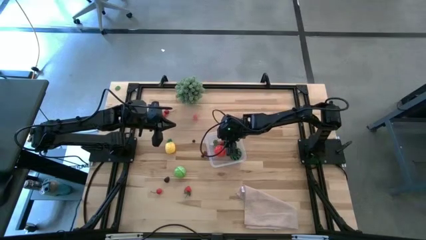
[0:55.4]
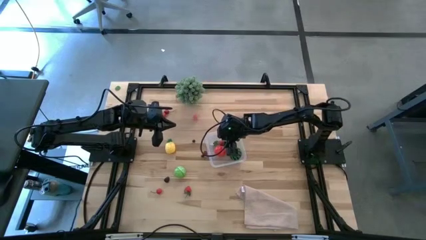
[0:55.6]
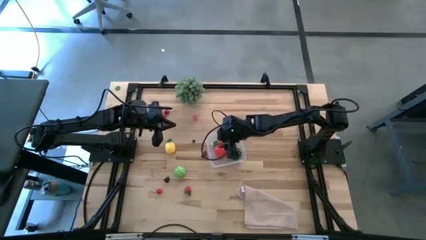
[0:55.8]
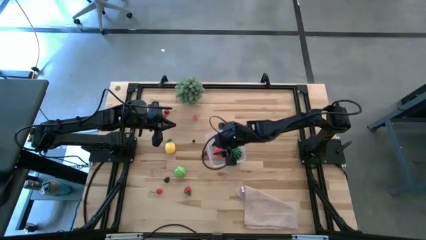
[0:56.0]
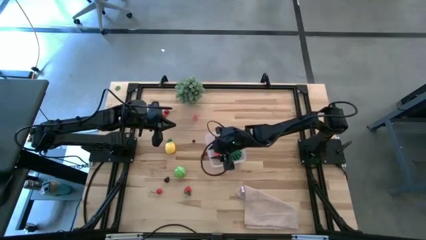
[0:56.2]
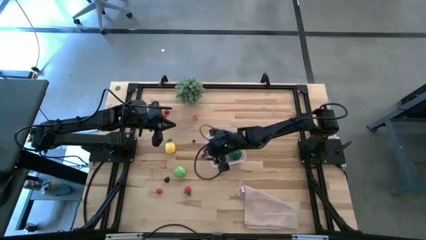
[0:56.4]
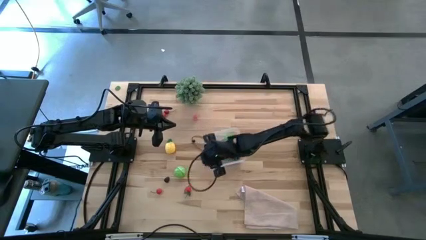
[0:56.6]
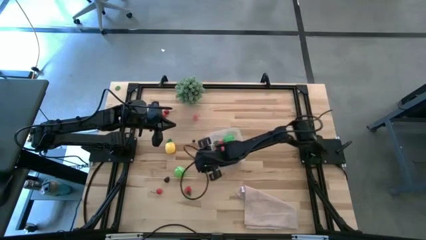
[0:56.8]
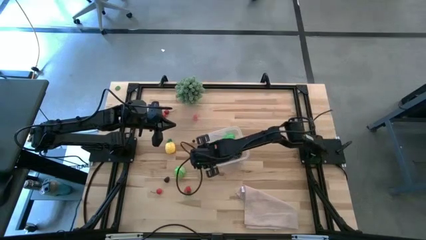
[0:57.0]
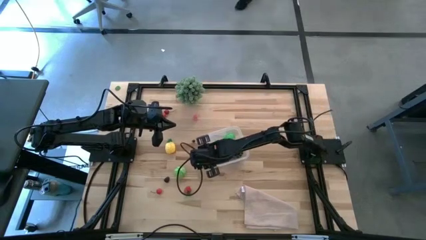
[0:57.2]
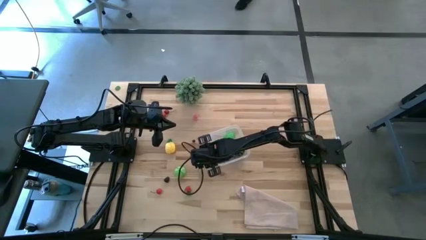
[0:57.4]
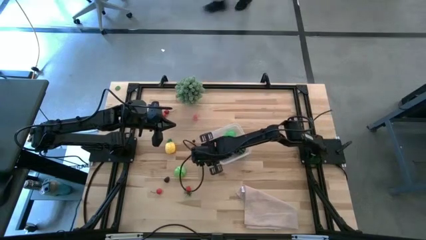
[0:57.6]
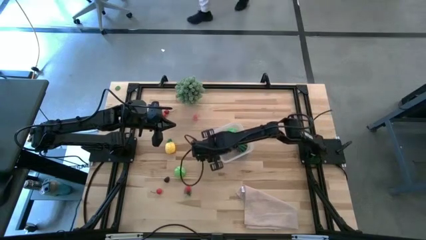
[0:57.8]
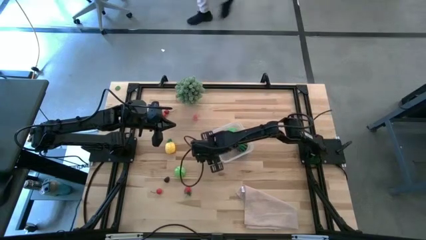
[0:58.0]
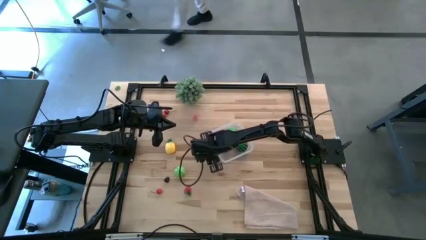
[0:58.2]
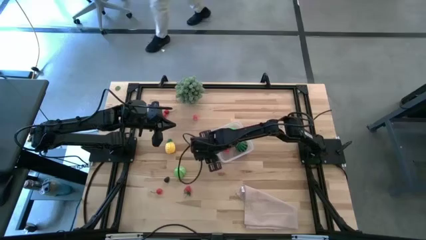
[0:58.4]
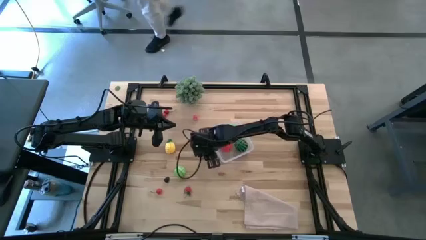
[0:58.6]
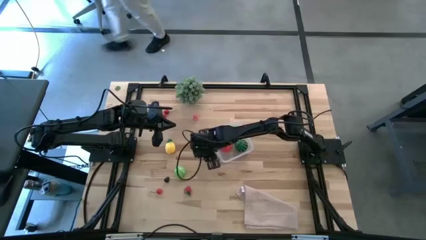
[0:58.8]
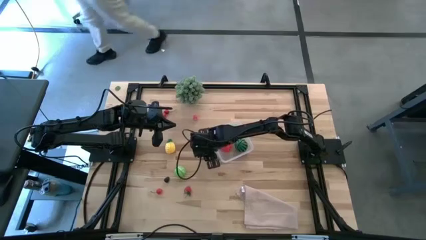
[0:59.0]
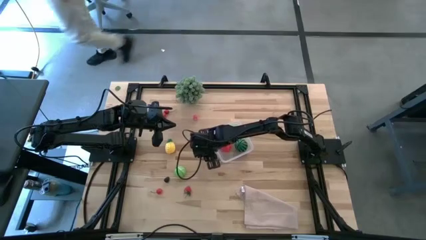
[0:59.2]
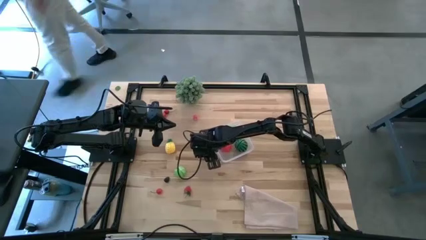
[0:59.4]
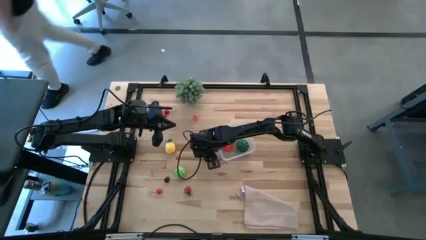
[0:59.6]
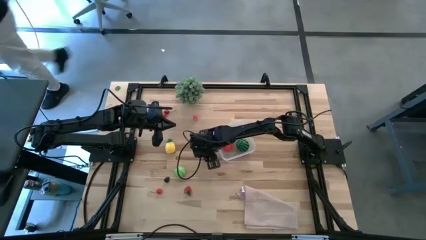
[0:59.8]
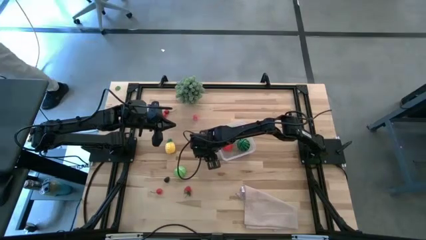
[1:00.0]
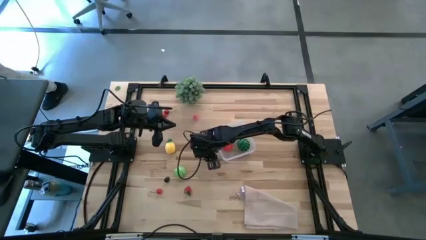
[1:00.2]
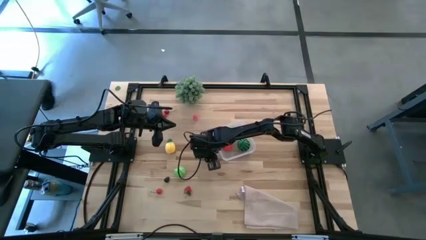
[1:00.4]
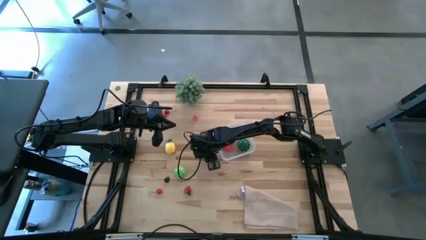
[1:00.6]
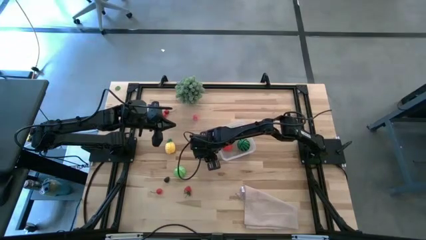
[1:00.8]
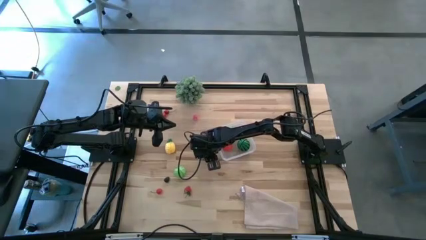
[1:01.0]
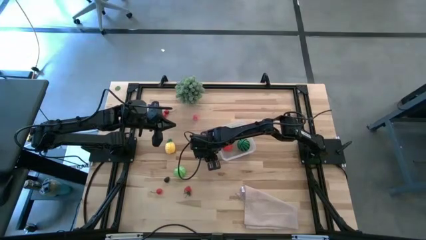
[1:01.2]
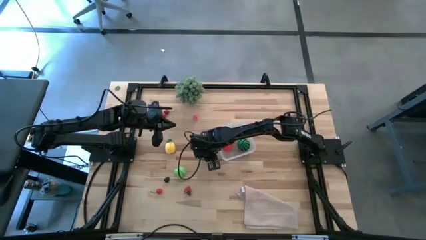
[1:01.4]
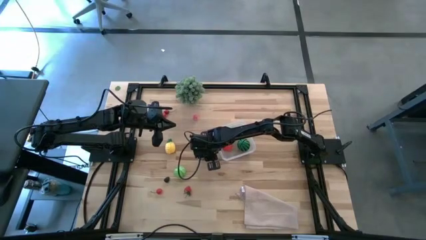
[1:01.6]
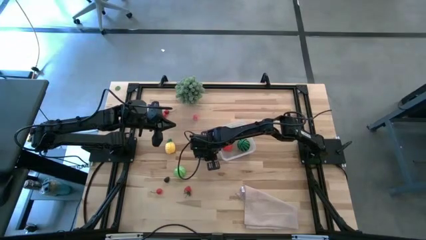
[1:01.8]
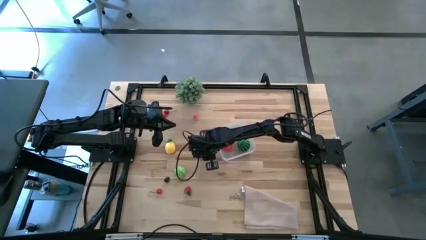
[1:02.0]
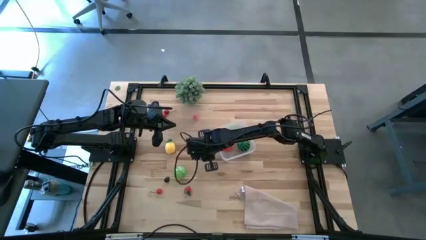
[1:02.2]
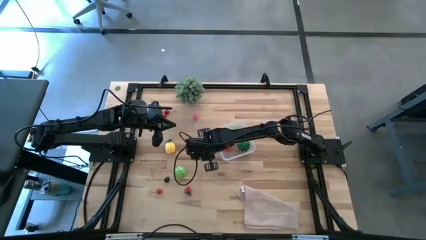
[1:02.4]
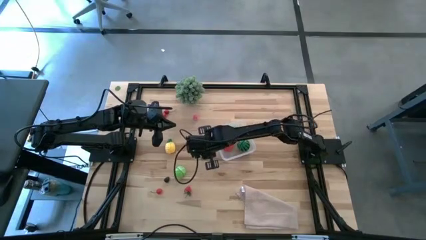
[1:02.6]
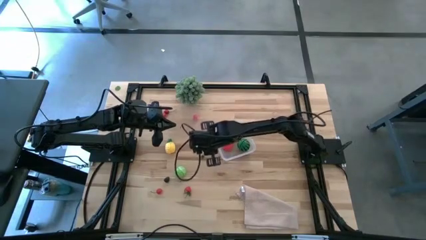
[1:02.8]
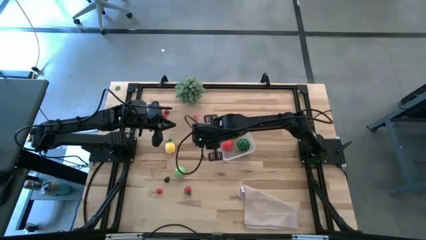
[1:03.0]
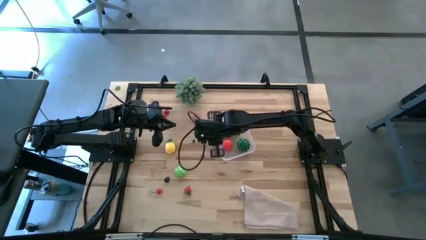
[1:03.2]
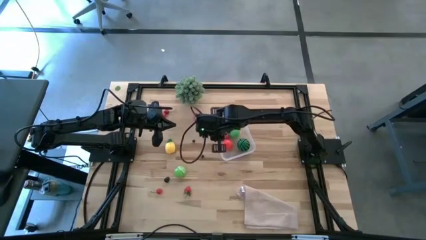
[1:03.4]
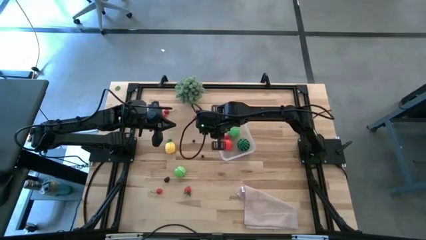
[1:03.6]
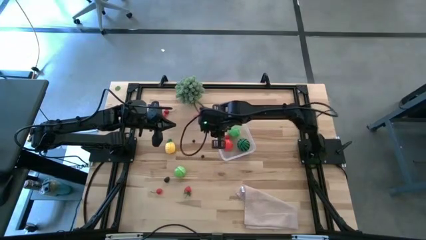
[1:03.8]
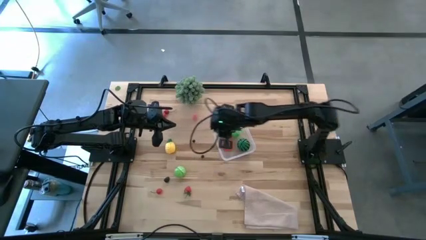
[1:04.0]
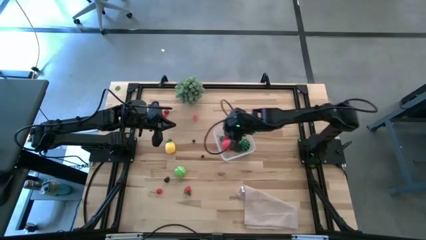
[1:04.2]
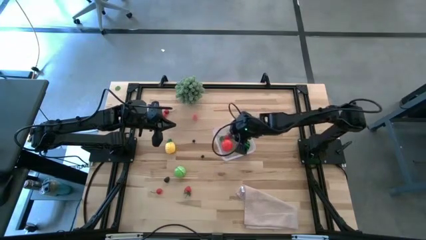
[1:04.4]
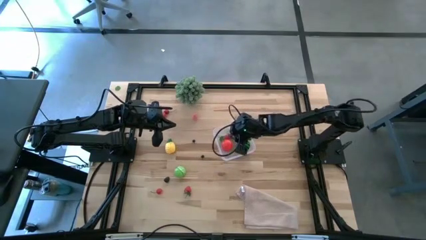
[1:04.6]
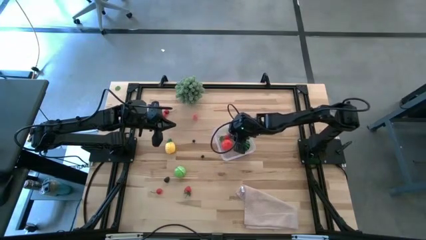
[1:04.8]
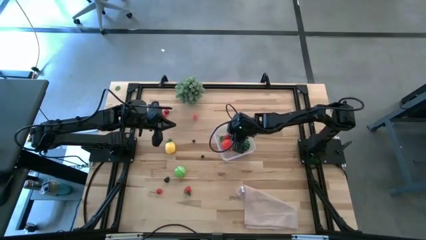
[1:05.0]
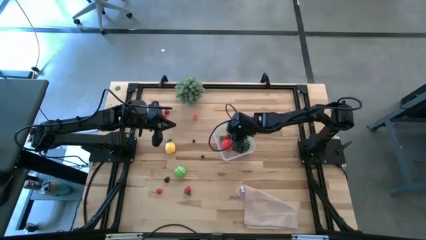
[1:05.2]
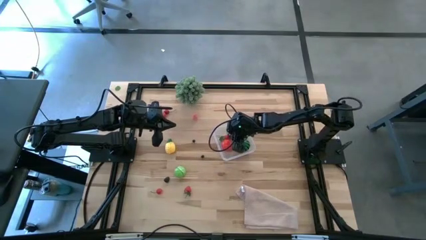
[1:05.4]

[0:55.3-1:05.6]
Task: Pick and placing Produce into tupperware
Put the red cherry into the transparent bin

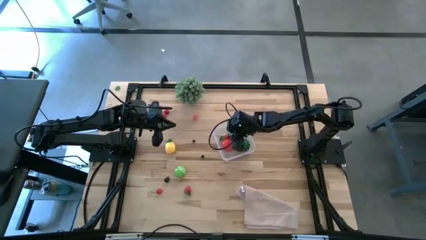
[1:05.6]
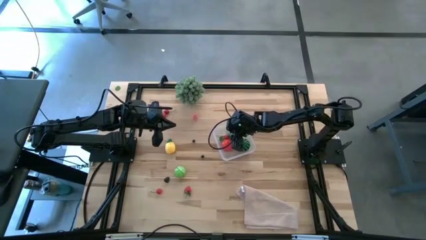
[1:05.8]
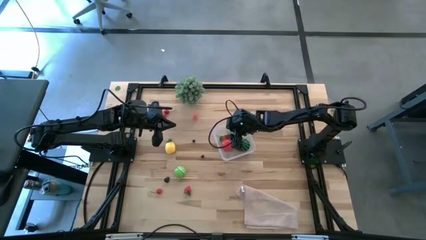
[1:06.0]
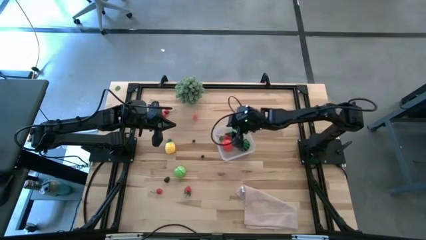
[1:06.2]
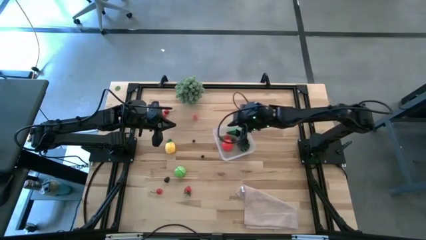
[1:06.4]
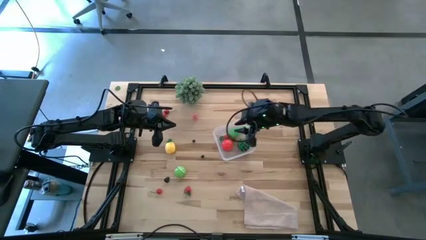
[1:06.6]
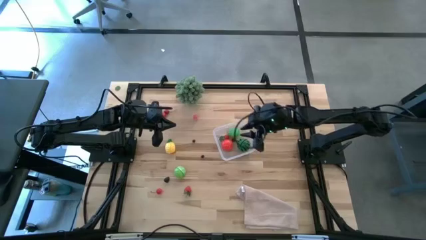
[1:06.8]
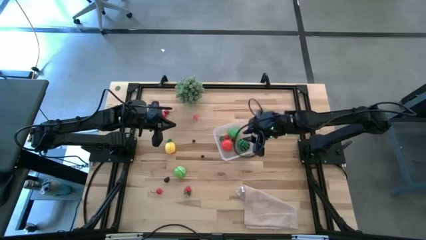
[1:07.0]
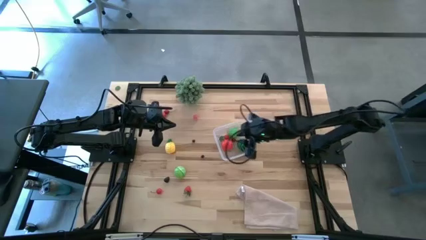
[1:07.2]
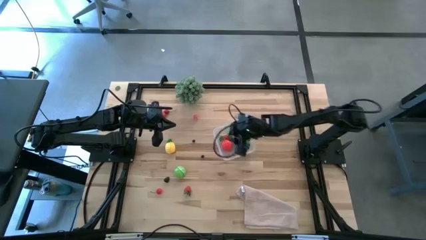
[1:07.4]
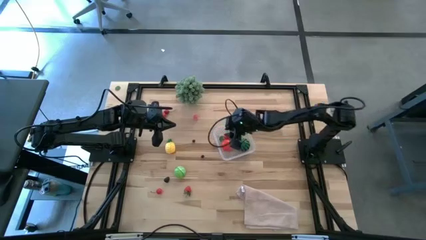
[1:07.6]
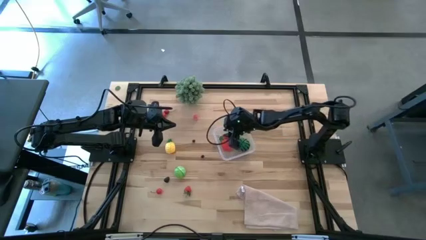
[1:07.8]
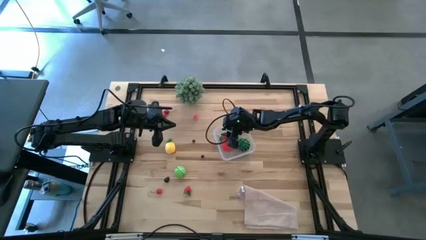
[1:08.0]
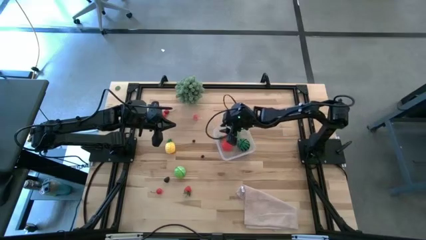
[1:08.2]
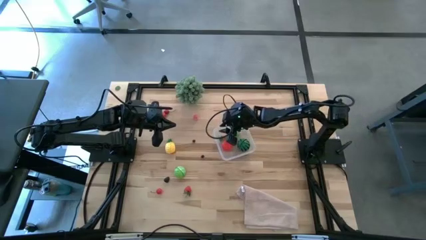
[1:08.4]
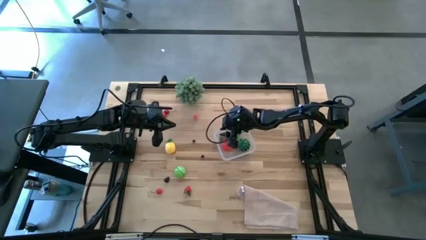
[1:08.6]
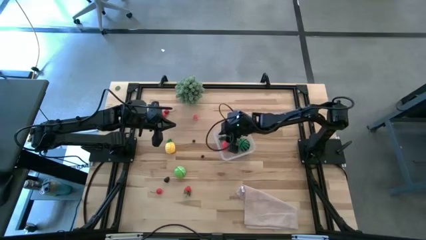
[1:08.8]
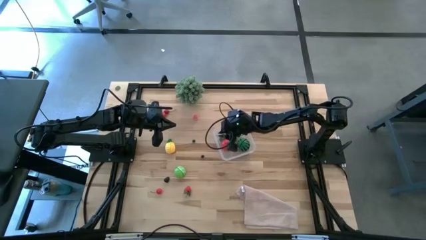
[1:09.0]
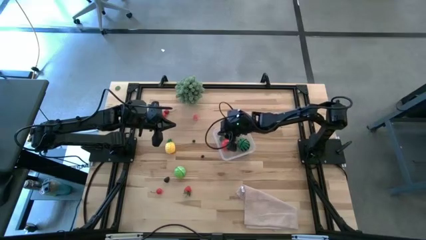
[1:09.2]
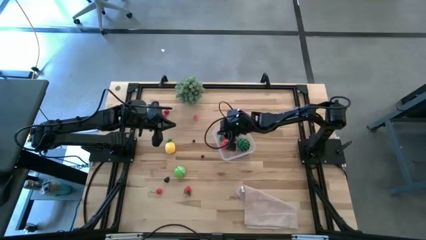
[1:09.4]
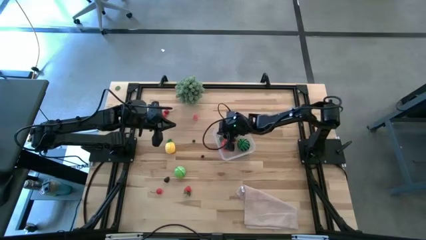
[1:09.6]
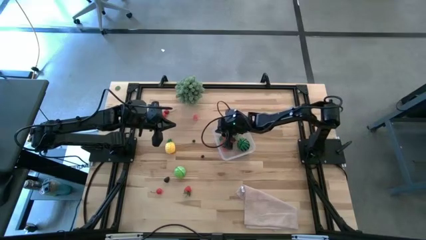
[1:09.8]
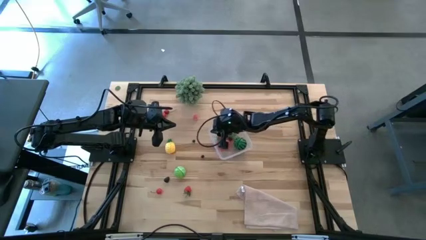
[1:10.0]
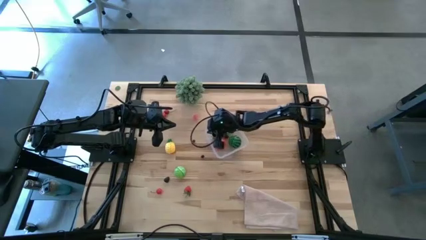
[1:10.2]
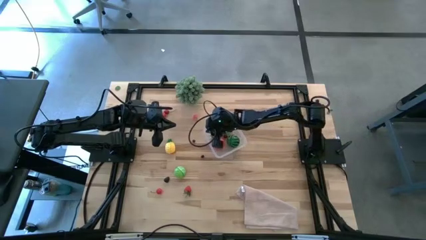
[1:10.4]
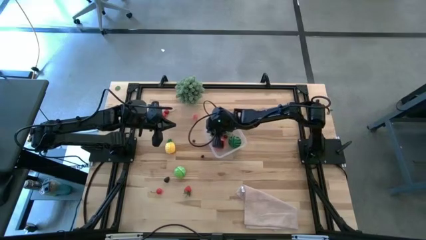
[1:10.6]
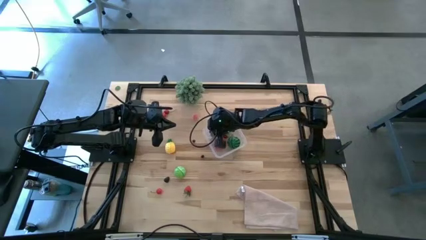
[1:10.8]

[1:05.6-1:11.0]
Adjust the transparent bin

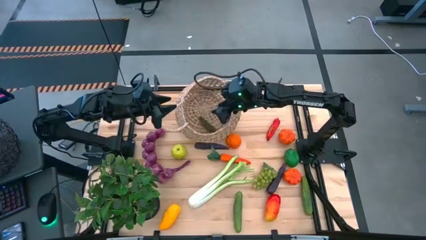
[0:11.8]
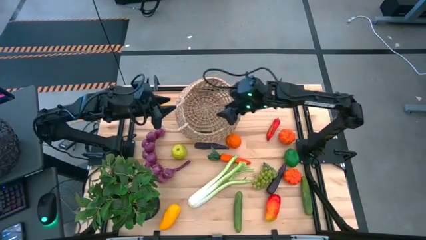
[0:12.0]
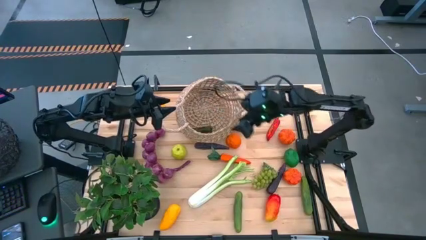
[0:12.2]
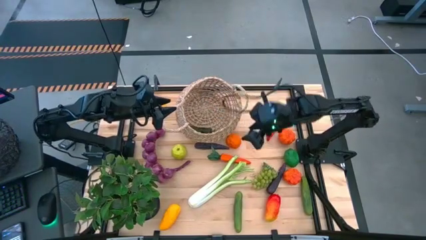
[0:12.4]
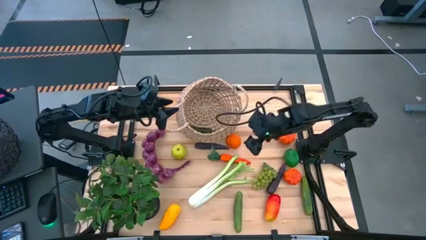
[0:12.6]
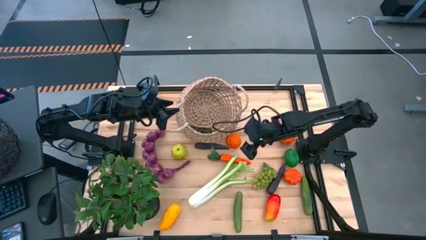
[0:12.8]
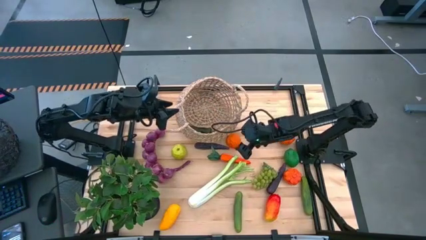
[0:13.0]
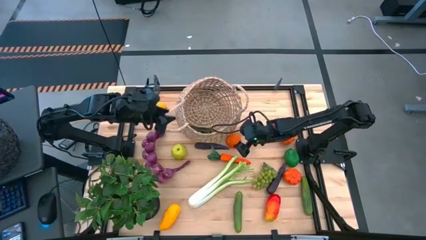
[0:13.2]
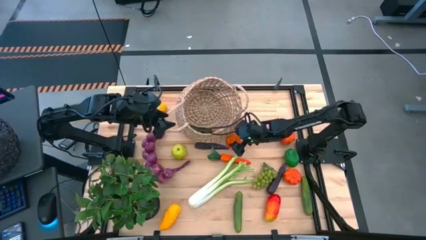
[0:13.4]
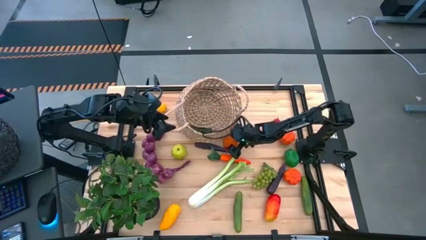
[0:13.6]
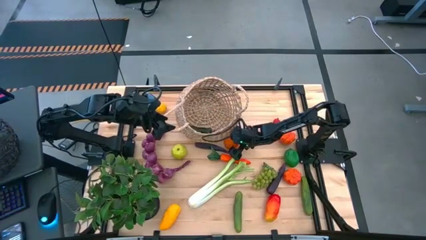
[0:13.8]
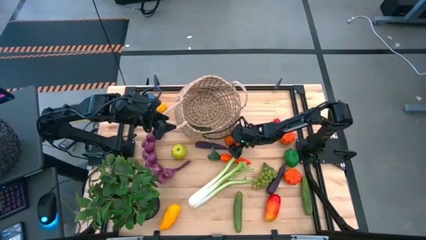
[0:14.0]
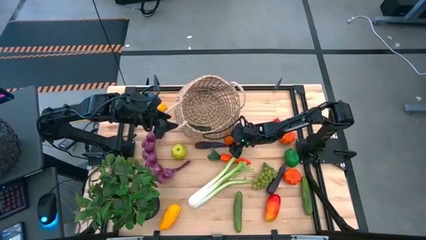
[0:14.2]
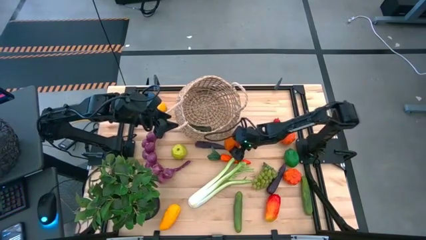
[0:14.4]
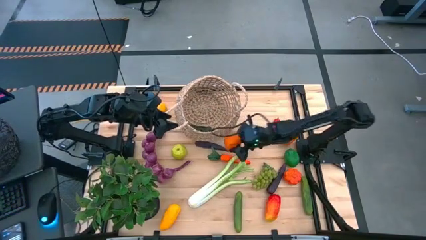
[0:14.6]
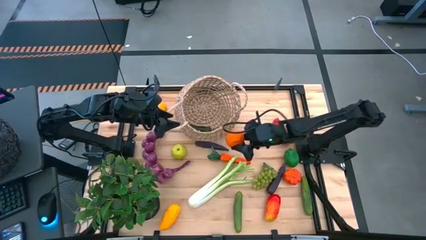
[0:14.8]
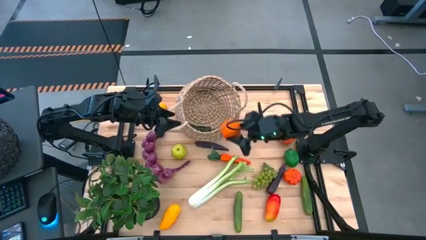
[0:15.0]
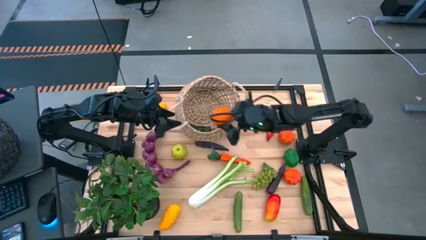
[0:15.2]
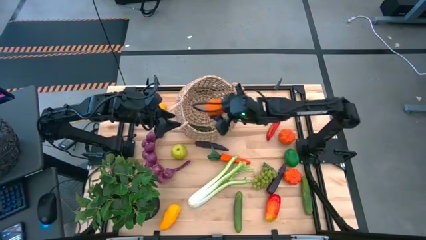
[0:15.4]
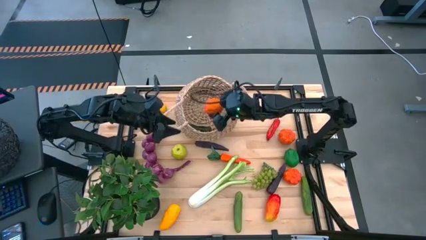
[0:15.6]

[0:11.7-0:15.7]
Task: Build produce basket
Put the orange into the brown basket
